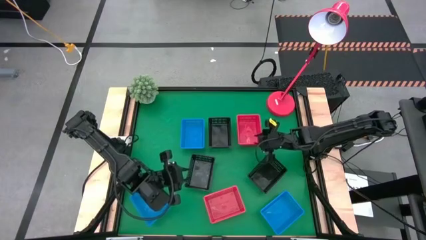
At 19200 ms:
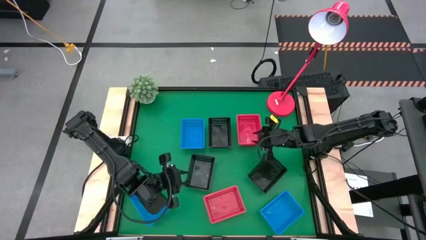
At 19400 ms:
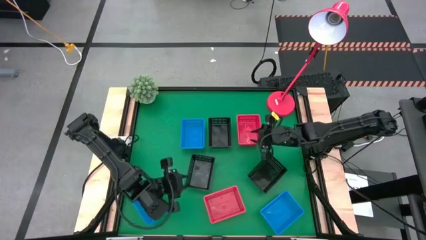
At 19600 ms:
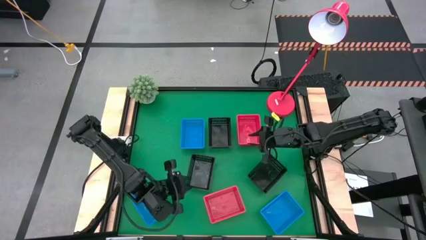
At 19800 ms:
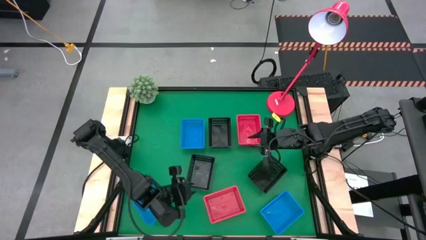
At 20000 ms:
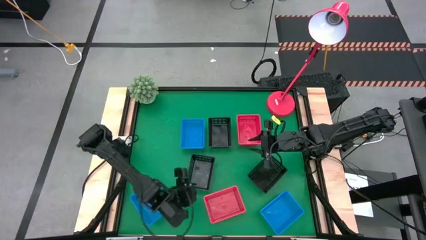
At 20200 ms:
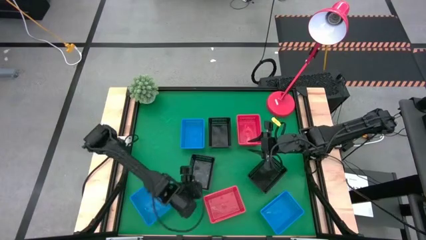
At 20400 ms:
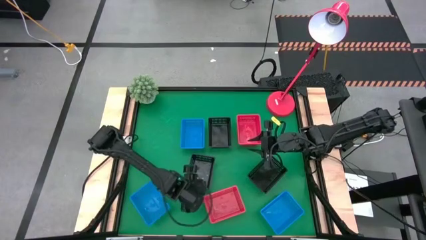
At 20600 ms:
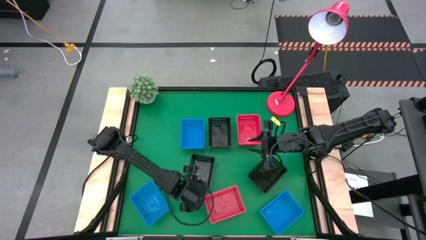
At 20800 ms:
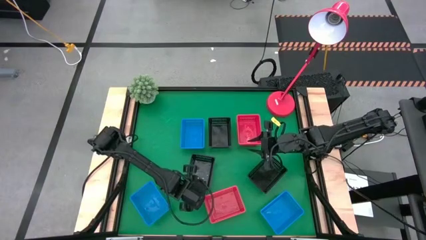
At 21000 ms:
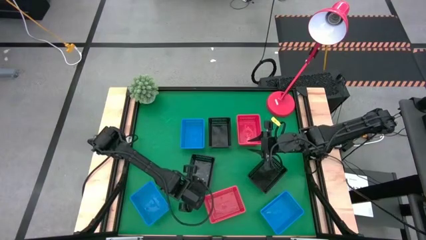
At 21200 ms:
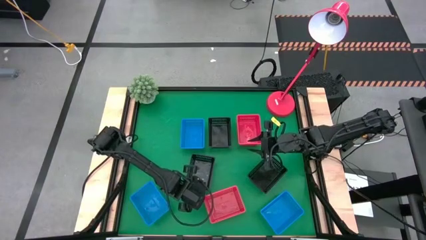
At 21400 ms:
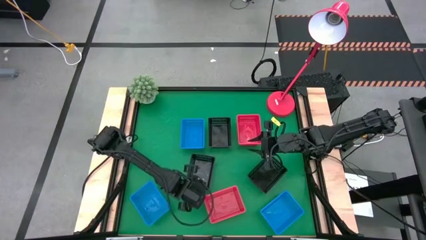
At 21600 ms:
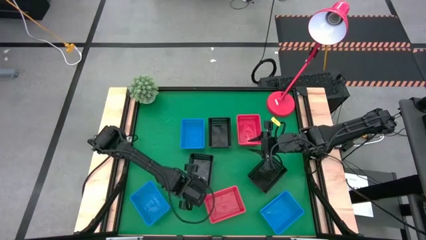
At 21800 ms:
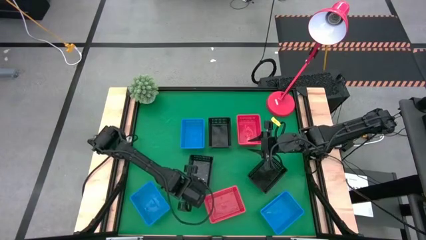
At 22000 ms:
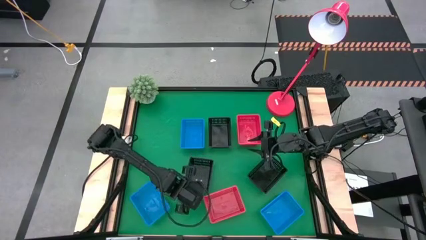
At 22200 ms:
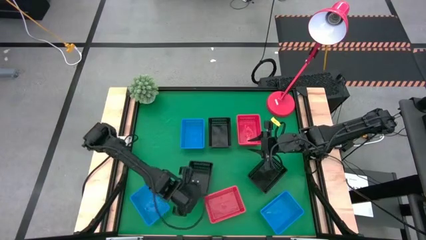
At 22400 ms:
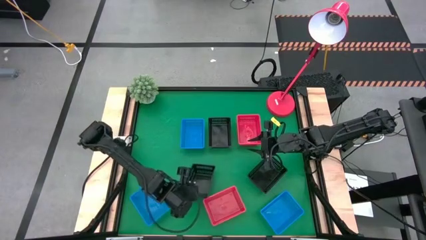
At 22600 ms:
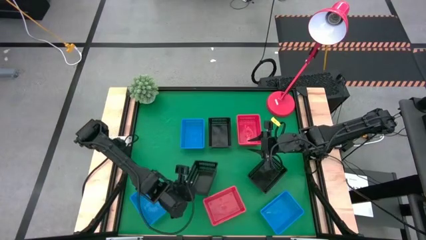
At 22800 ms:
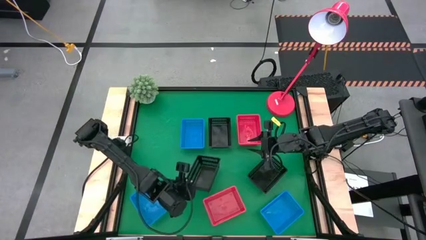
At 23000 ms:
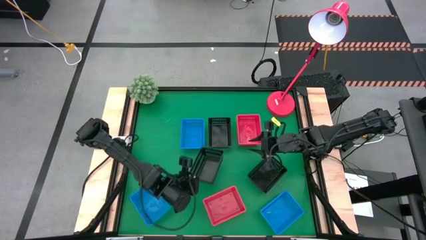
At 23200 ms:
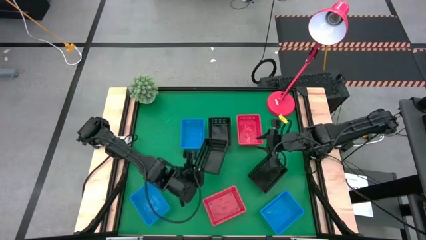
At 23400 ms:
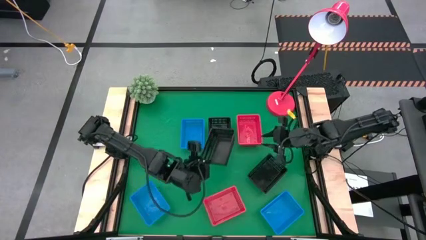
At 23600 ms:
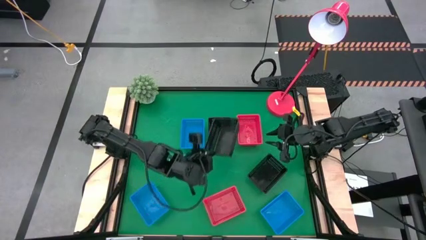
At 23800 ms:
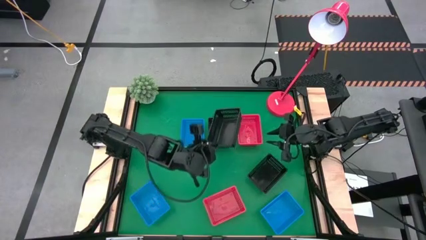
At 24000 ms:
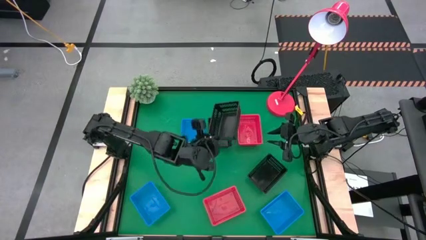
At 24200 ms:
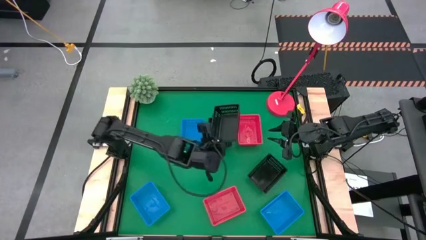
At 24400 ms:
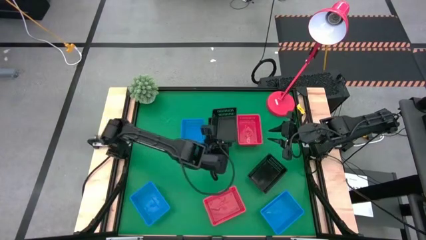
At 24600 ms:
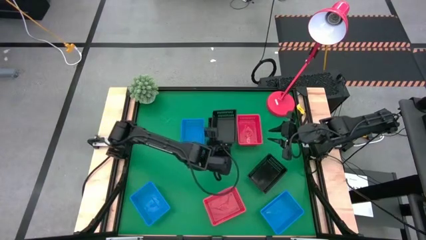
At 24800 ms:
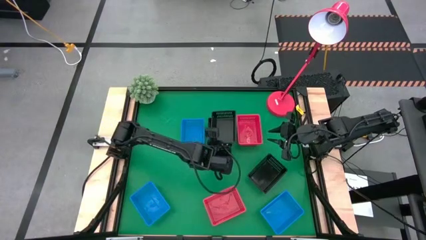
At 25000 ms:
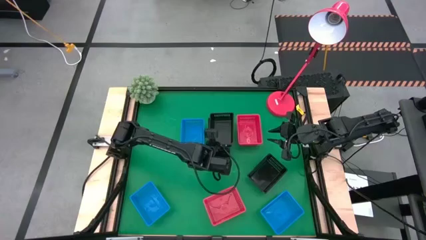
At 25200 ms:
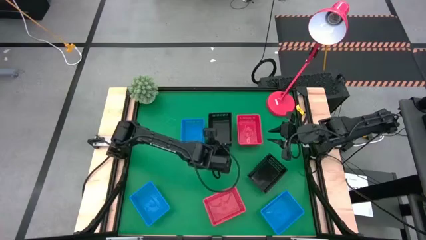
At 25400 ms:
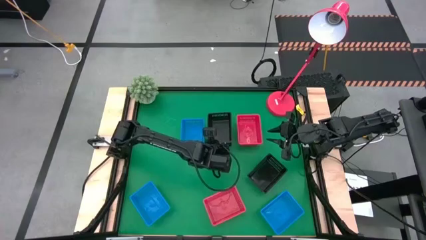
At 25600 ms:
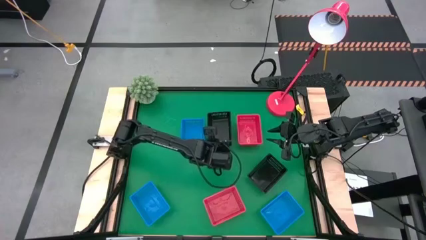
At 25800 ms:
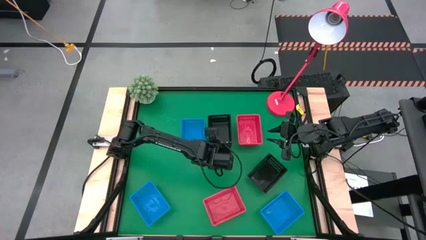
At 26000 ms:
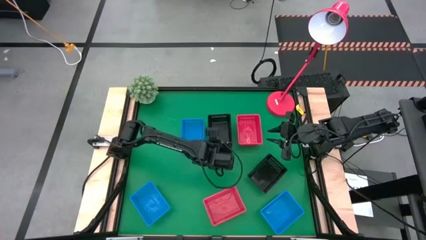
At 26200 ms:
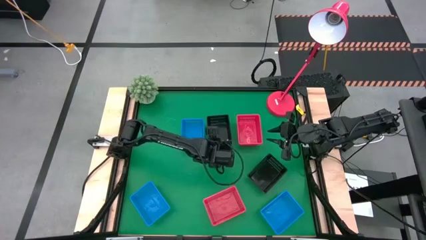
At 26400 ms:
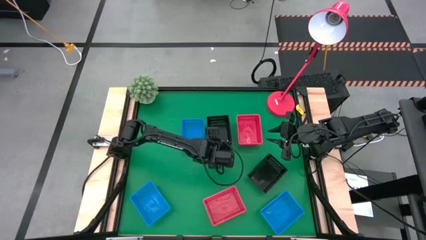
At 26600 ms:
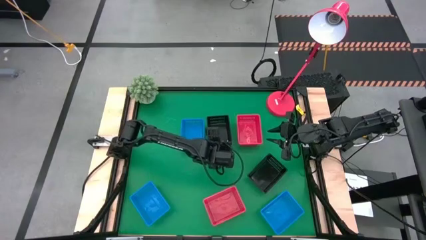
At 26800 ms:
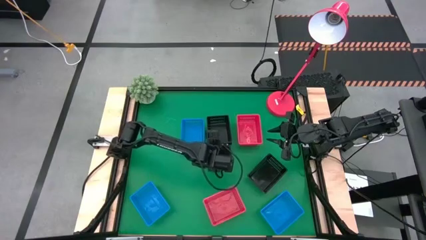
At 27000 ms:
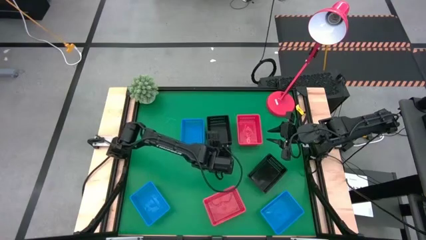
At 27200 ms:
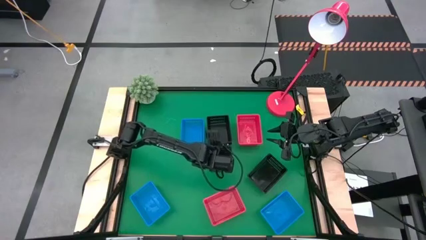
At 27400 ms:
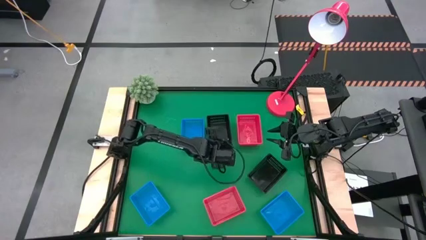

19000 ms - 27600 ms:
Stack the bottom left black bin on top of the top black bin

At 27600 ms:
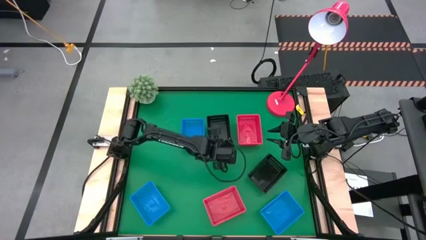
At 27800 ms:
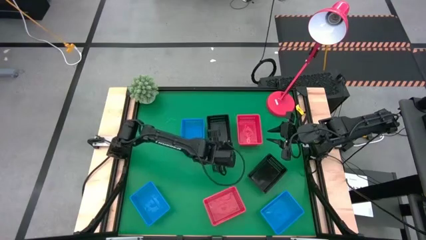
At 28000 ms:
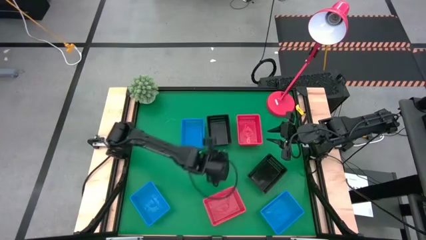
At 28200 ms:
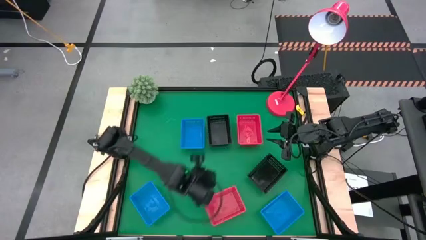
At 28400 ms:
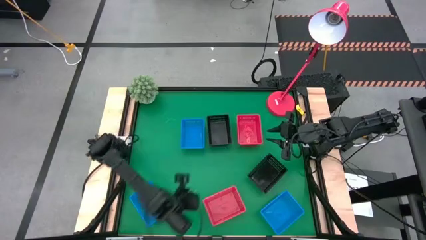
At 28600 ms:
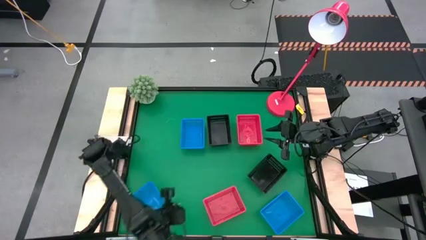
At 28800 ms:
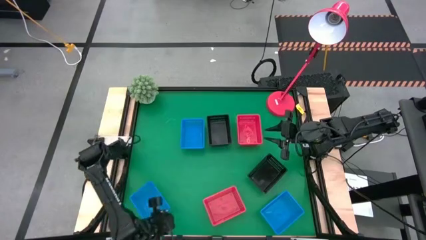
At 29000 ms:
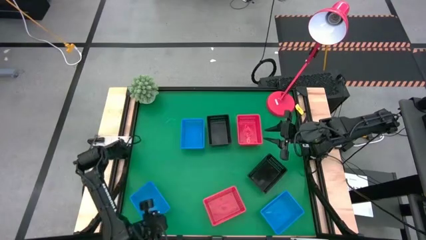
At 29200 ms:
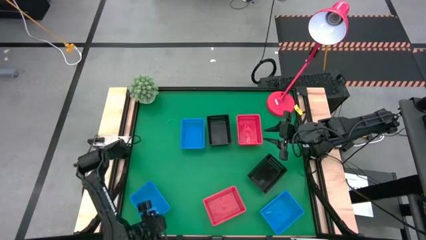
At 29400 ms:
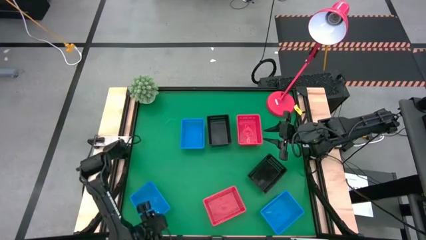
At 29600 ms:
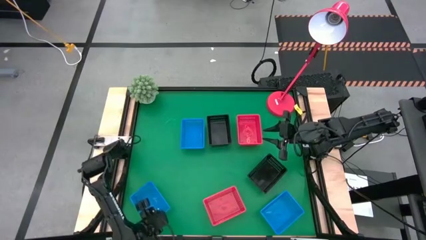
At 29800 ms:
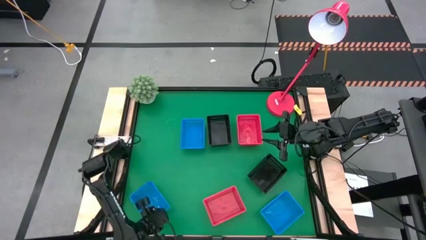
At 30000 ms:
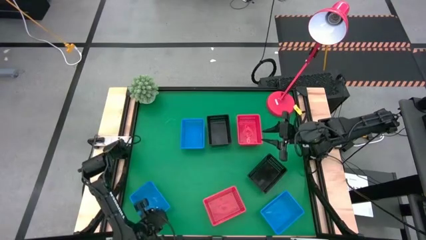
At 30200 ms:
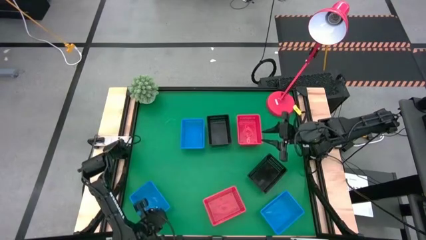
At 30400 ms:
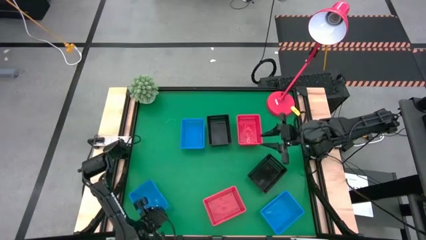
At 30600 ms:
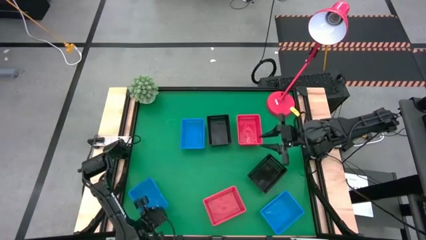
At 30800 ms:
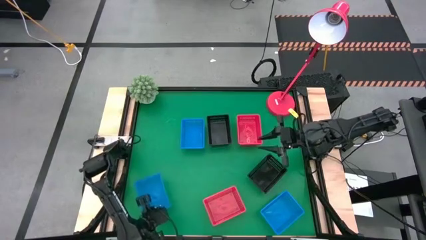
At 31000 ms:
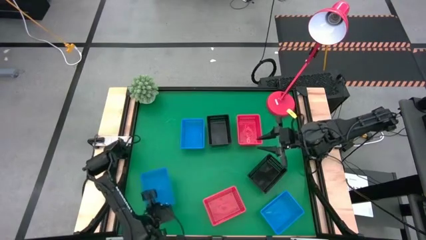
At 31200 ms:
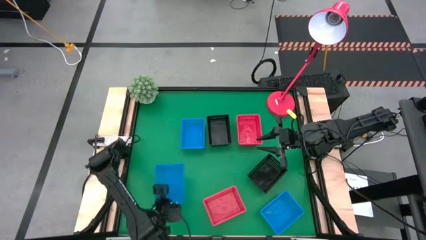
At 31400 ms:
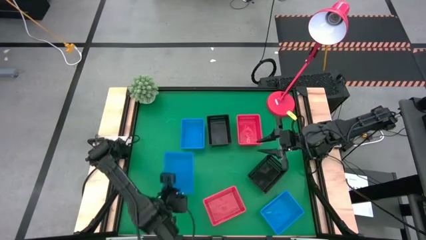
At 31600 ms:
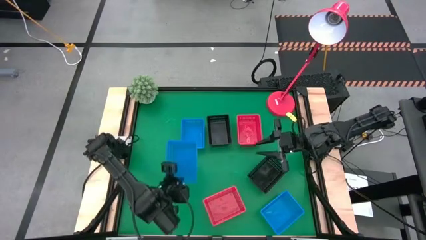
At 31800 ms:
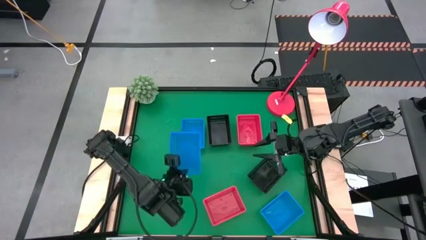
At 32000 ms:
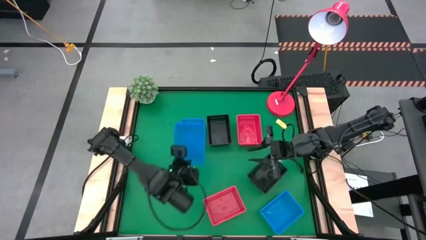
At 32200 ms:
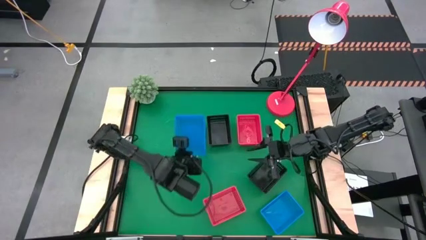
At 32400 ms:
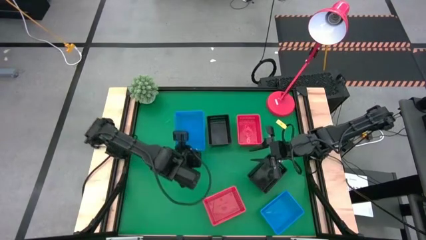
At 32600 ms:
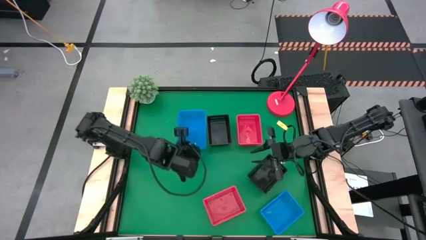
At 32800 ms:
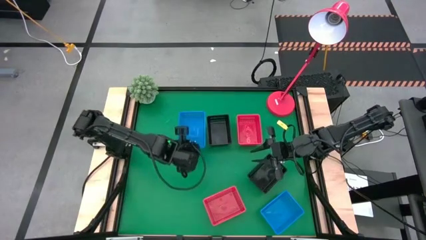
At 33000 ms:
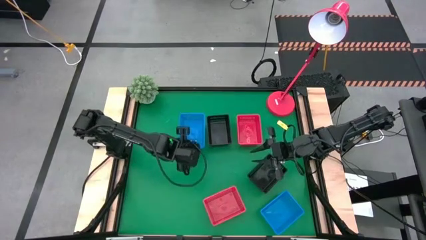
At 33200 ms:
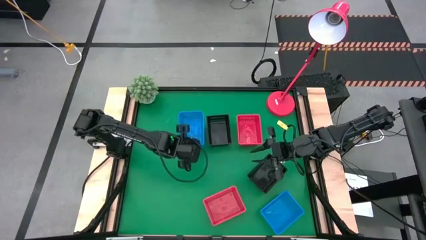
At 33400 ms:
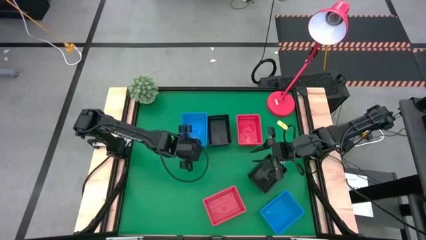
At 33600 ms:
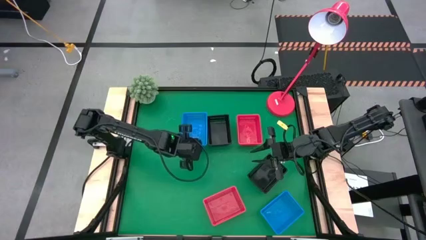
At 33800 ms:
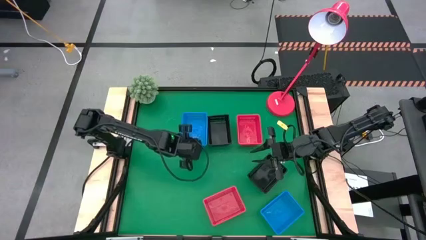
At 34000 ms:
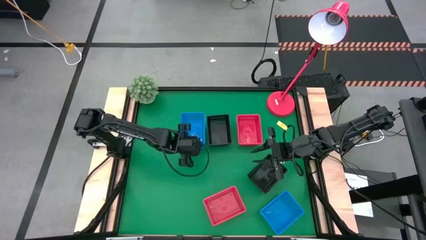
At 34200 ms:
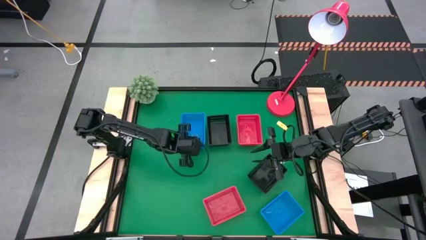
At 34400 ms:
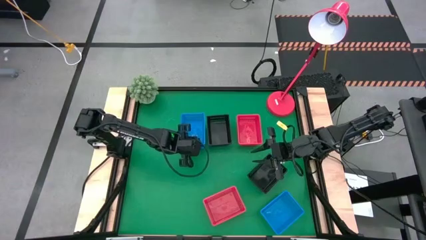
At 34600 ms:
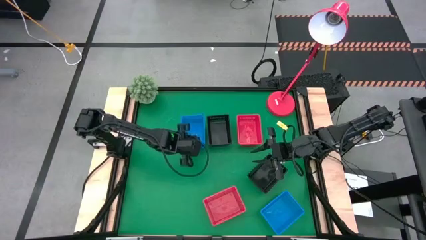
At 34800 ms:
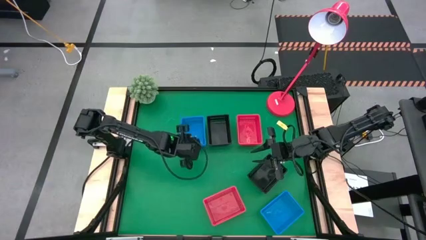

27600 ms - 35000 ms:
Stack the bottom left blue bin on top of the top blue bin
